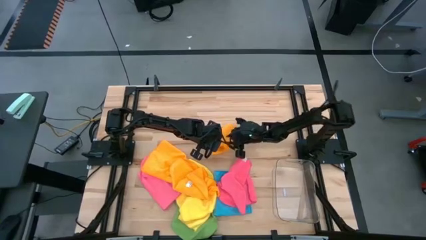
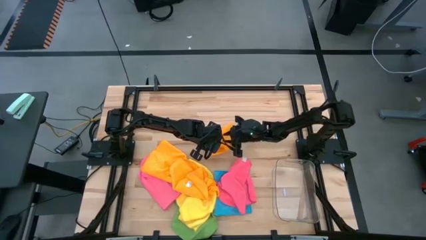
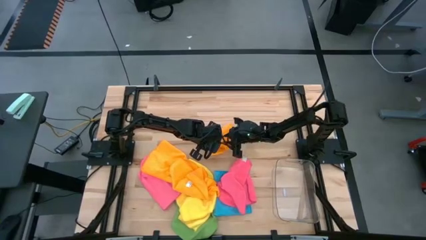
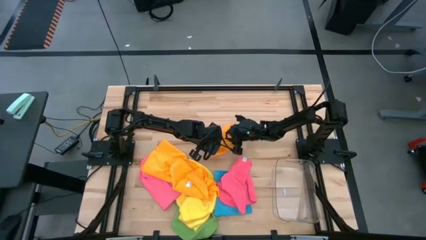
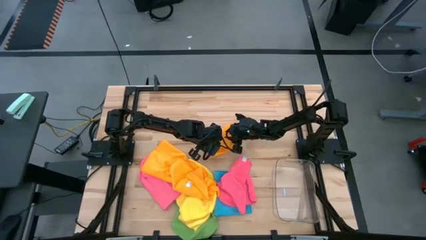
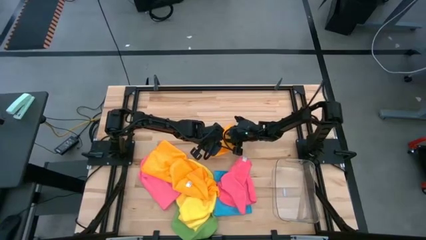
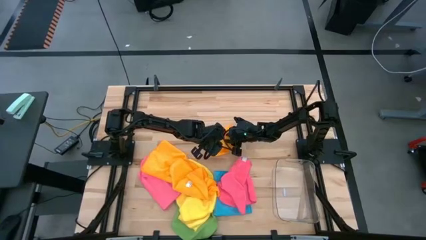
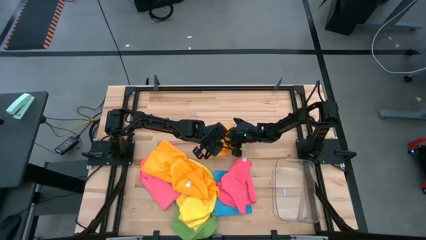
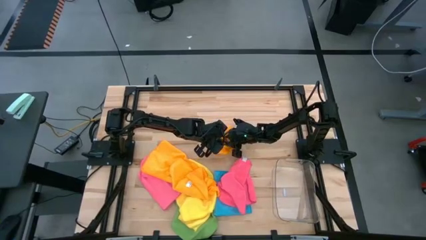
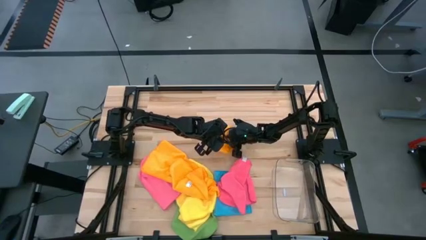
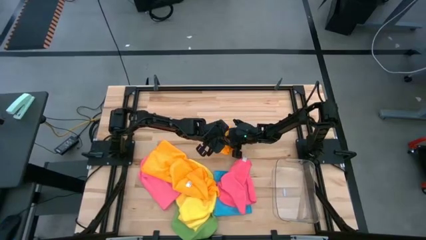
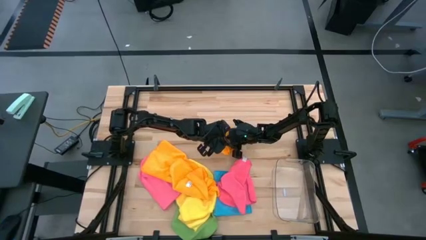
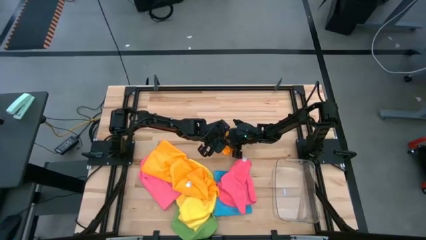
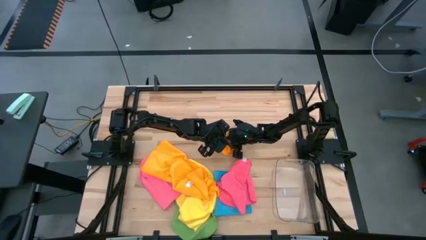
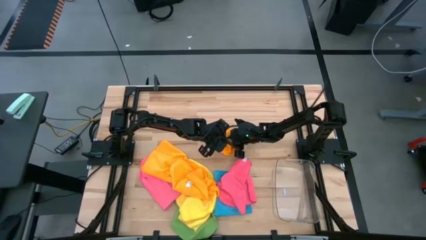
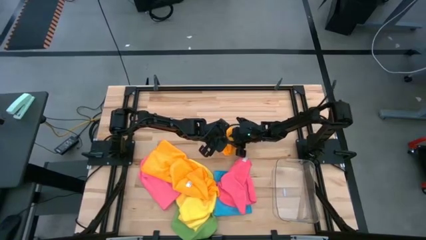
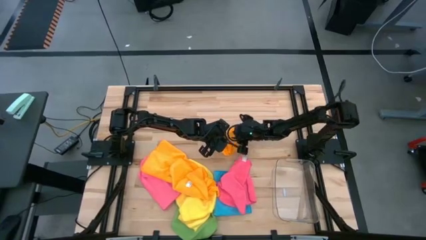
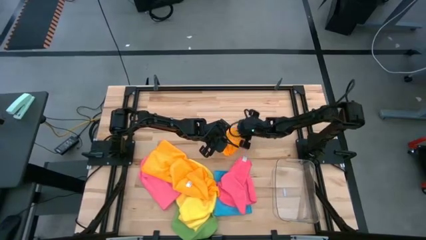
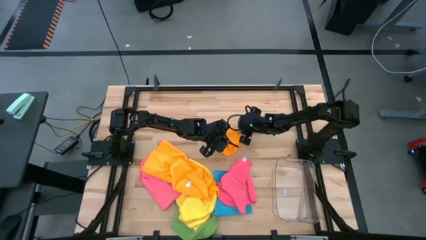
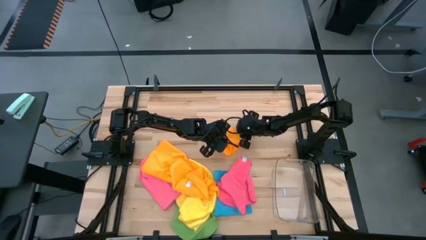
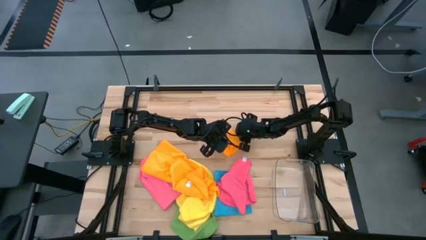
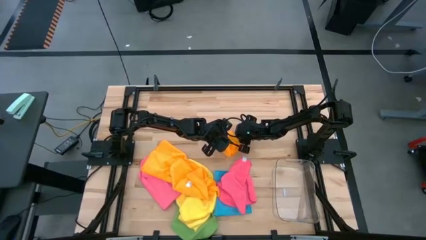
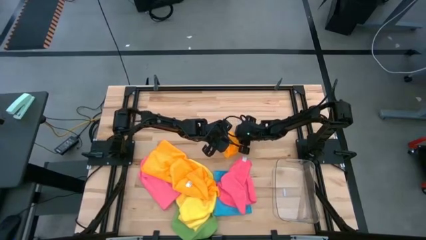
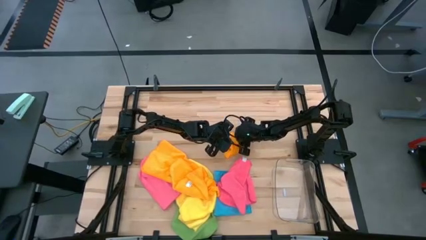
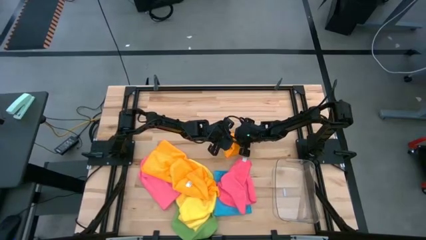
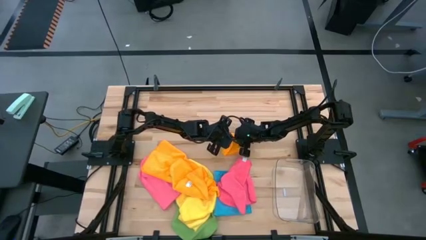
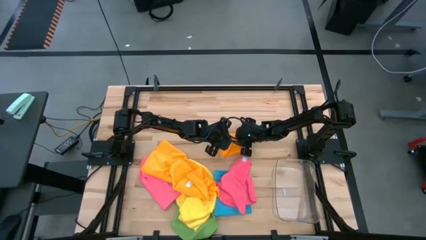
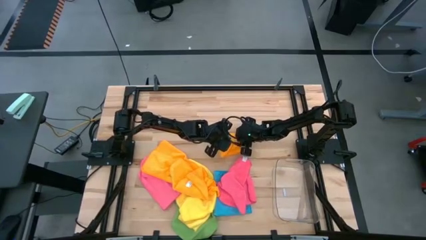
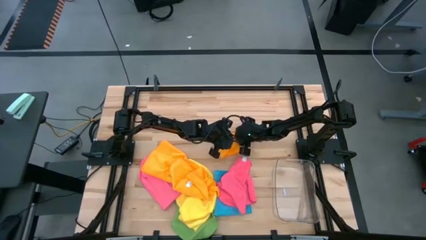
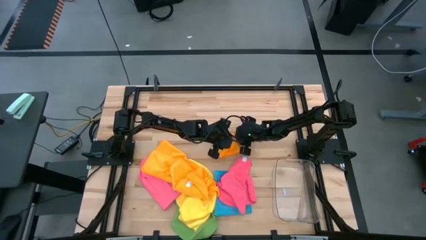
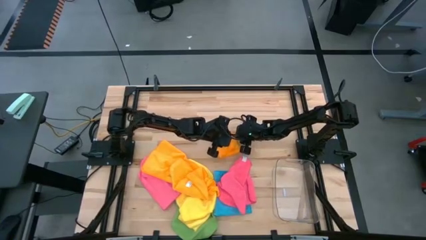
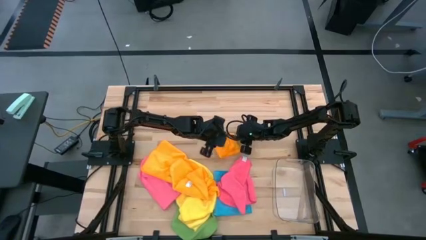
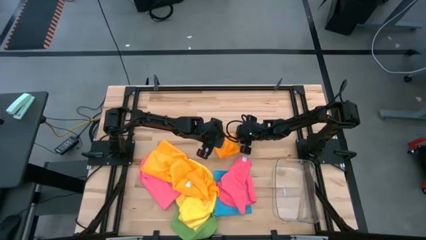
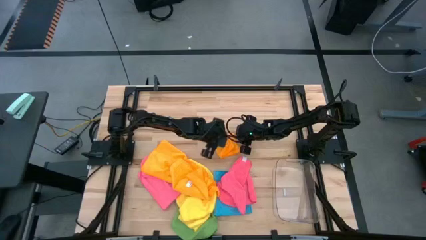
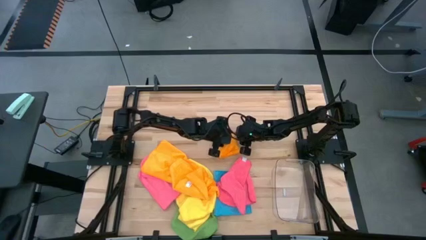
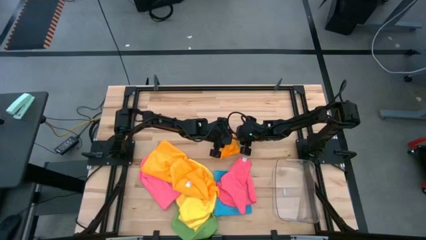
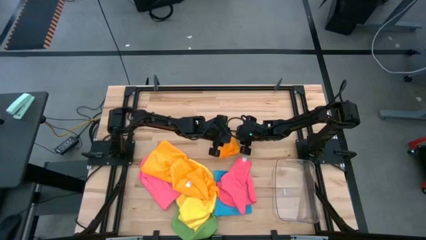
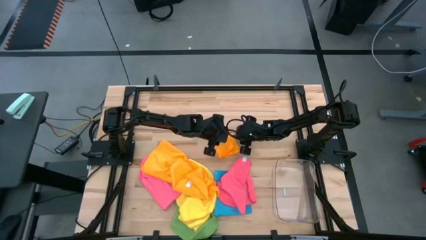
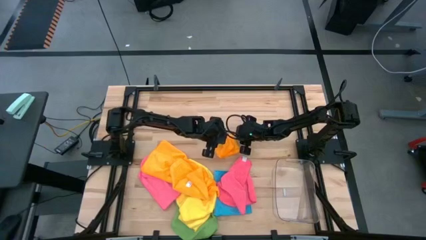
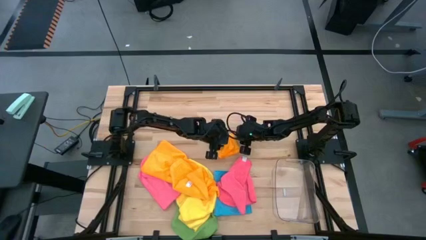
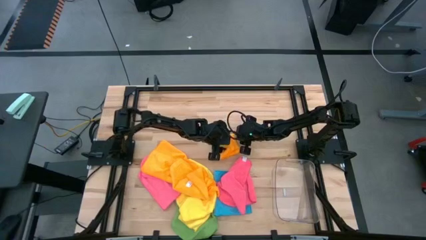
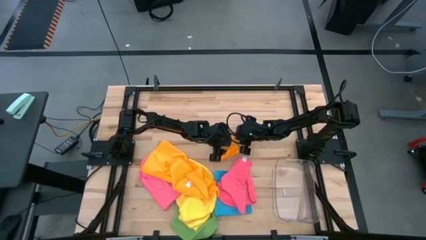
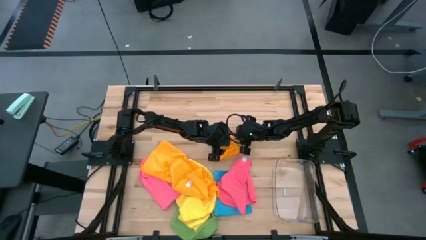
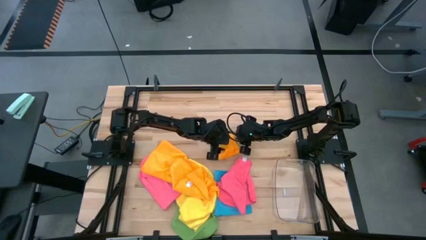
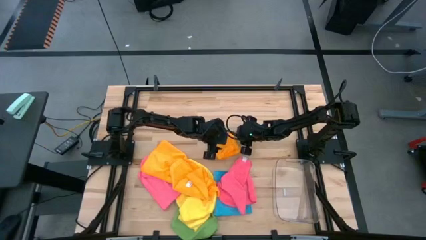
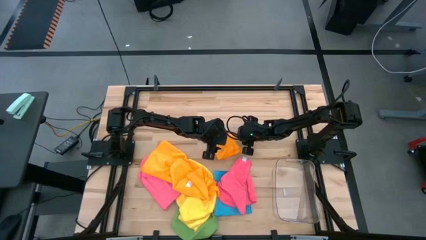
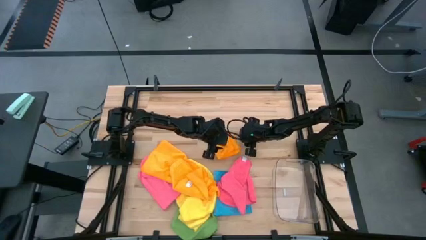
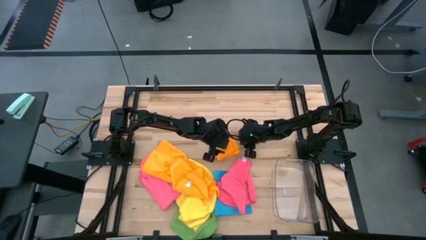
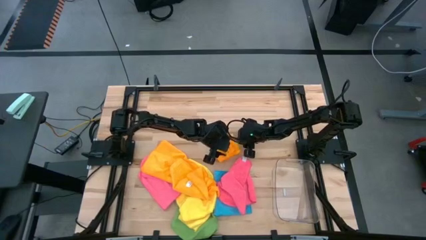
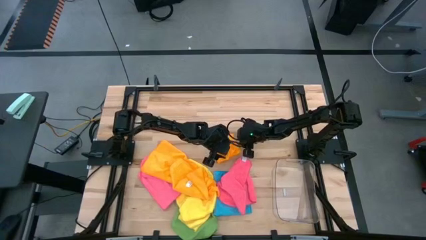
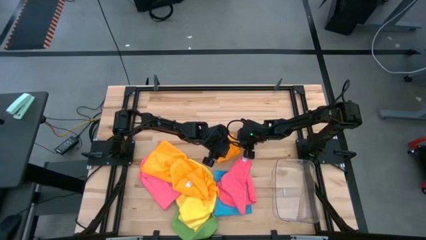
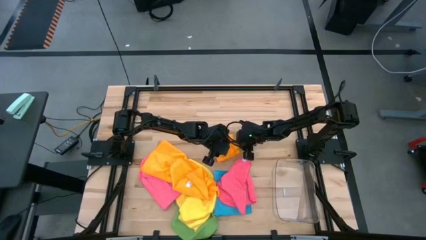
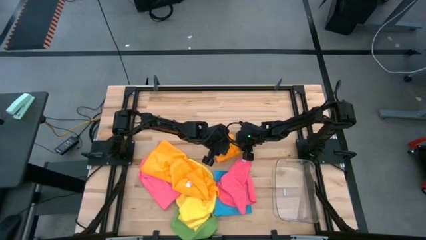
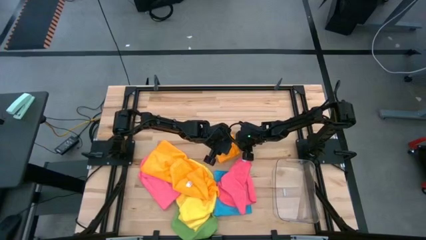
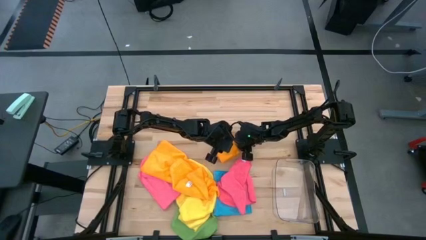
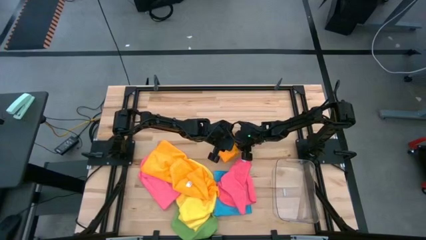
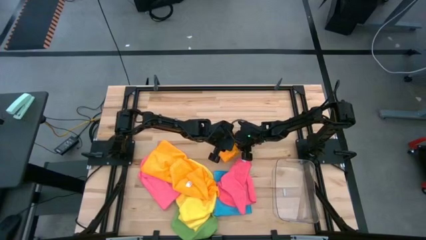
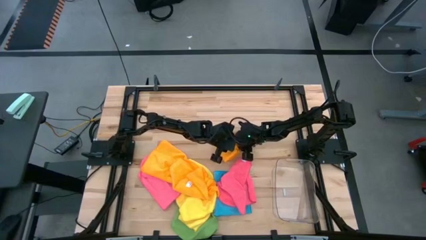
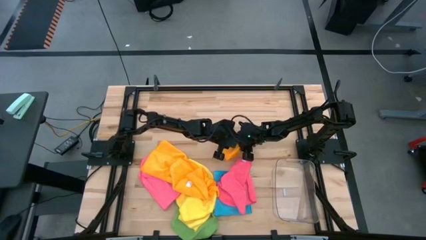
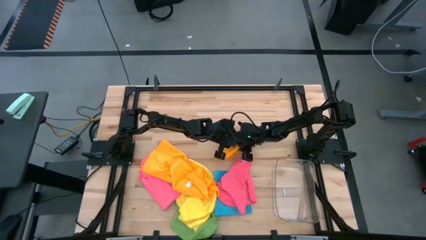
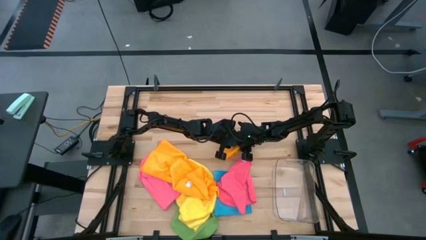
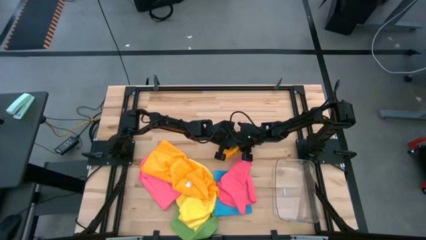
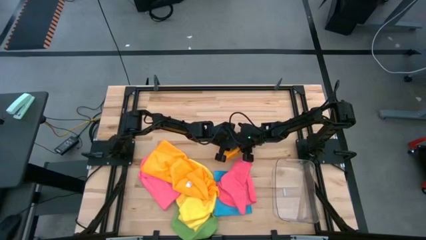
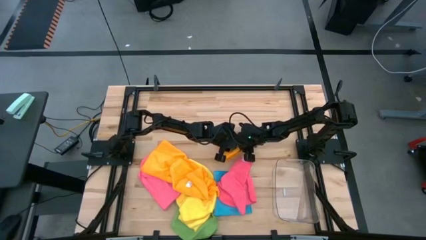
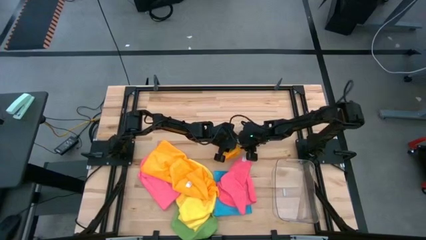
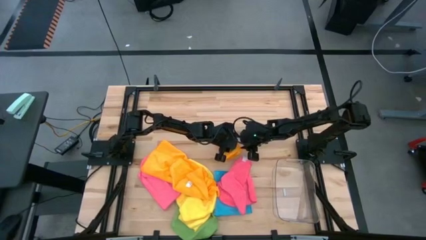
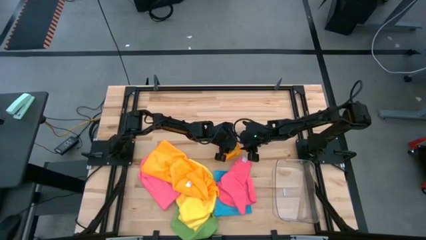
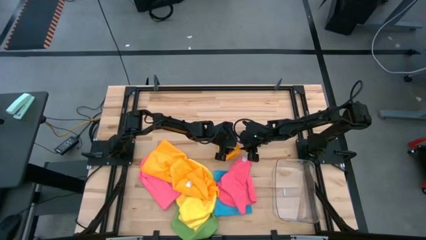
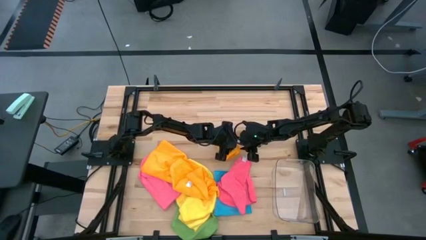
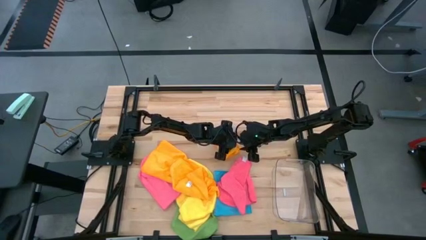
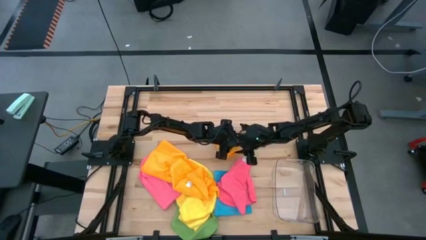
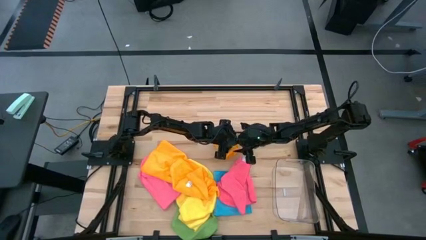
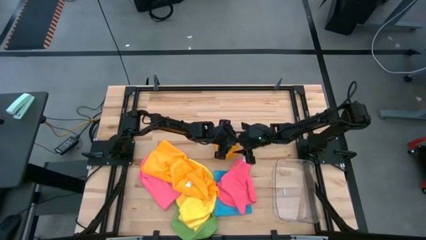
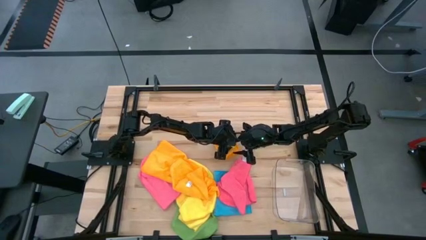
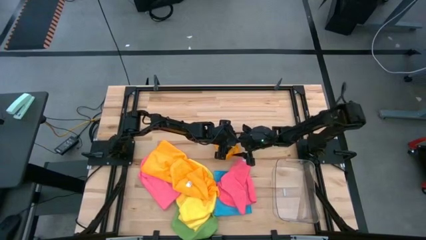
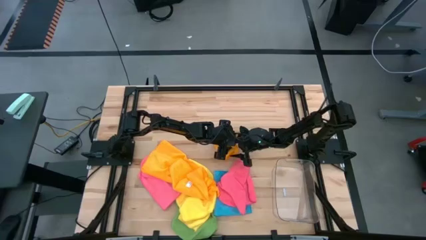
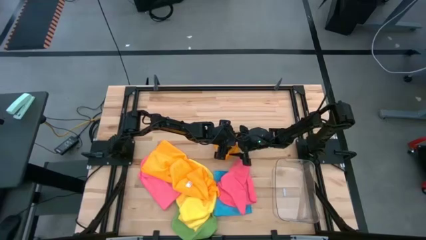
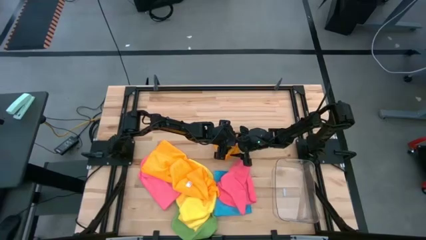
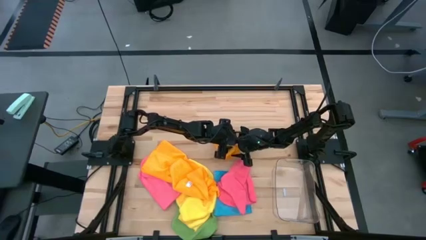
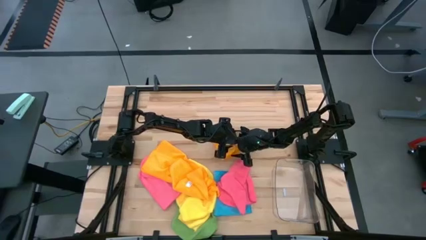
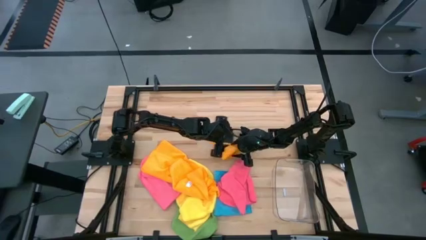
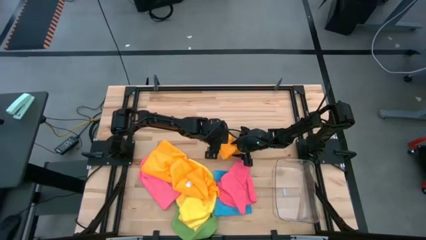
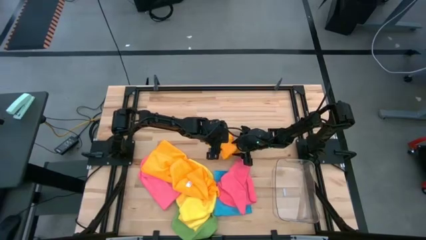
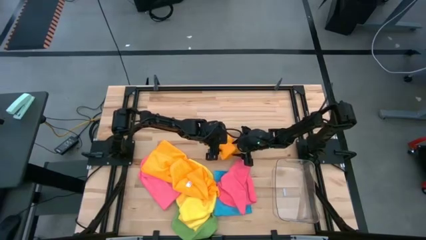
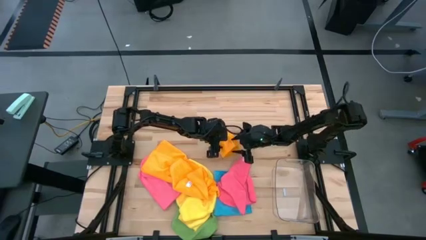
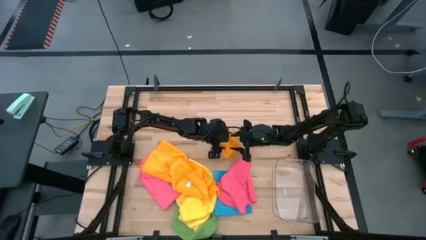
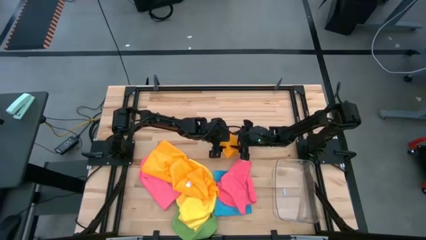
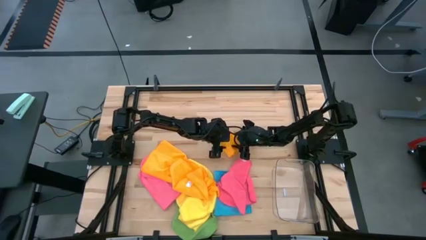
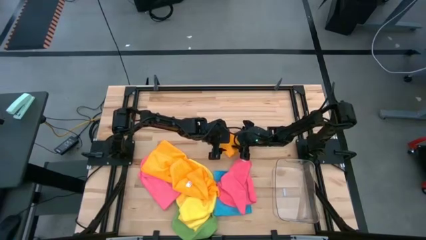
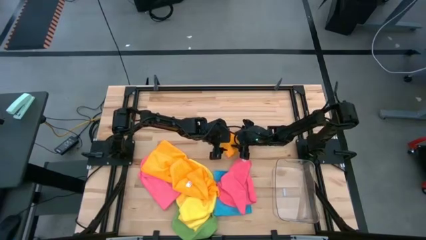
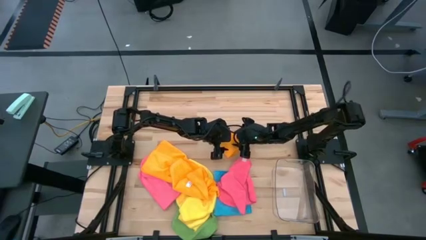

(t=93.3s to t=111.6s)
Task: Fold microfiber towels
Fold the orange towel
